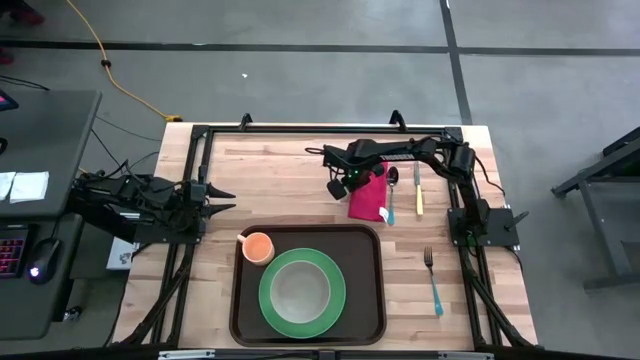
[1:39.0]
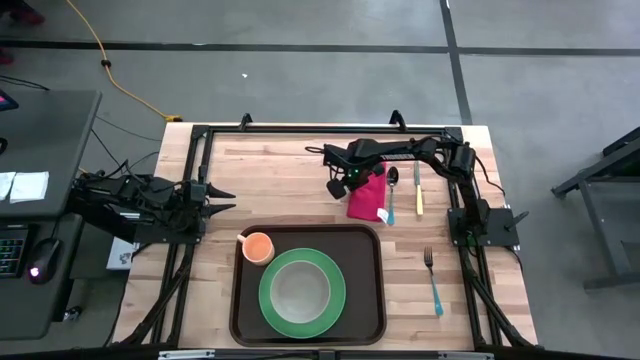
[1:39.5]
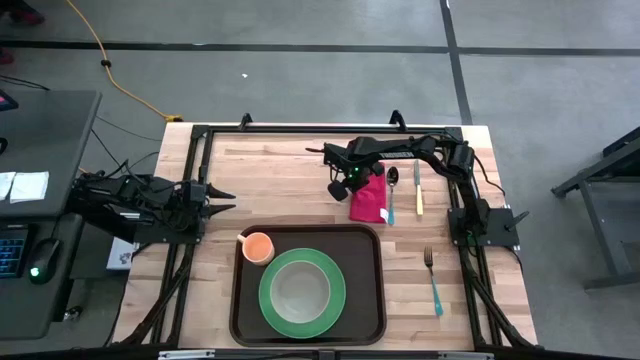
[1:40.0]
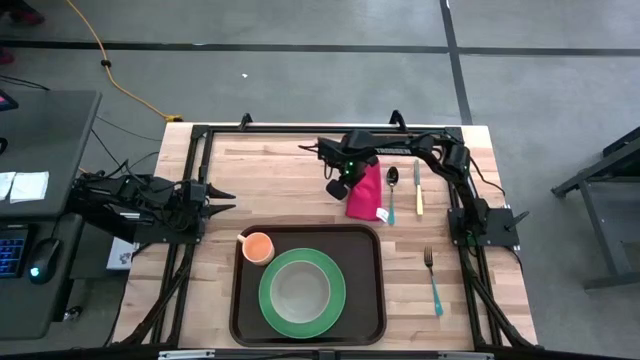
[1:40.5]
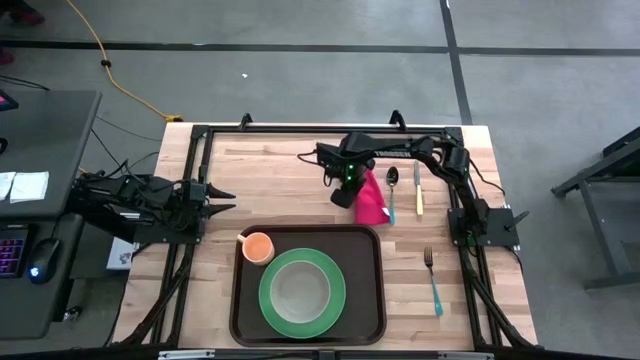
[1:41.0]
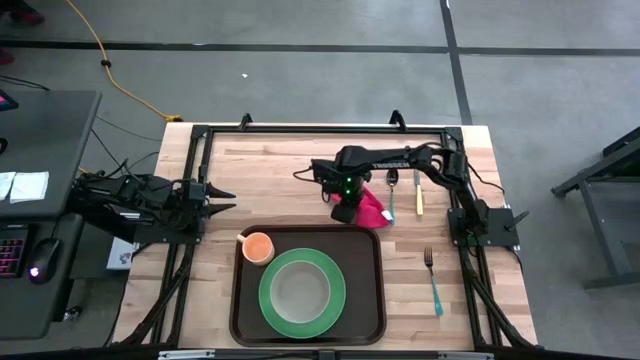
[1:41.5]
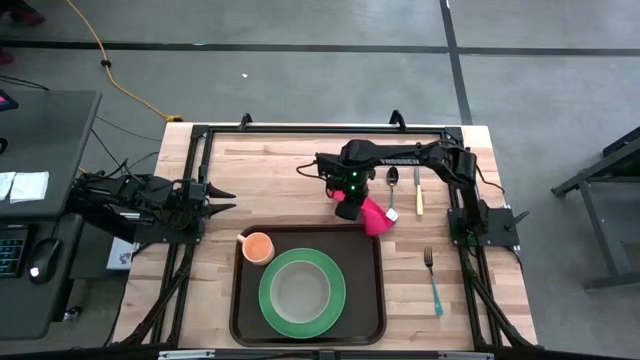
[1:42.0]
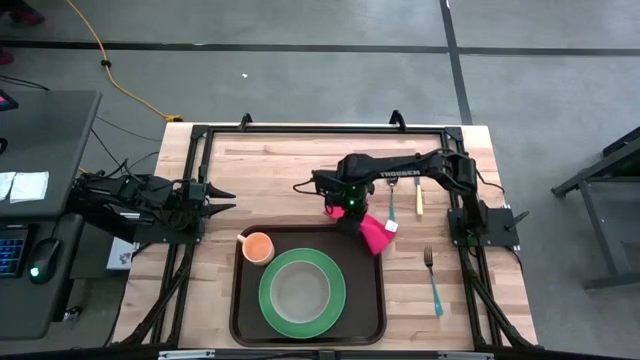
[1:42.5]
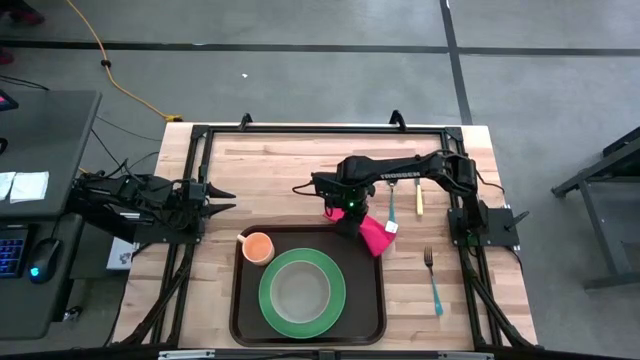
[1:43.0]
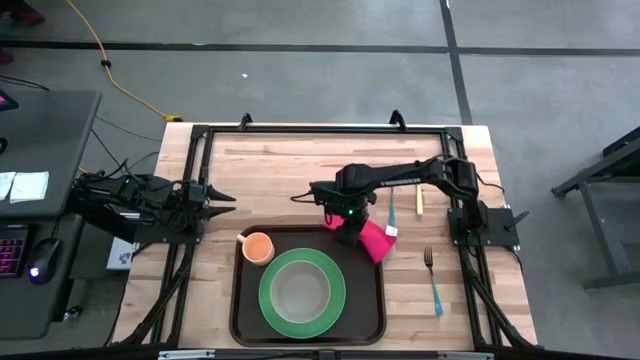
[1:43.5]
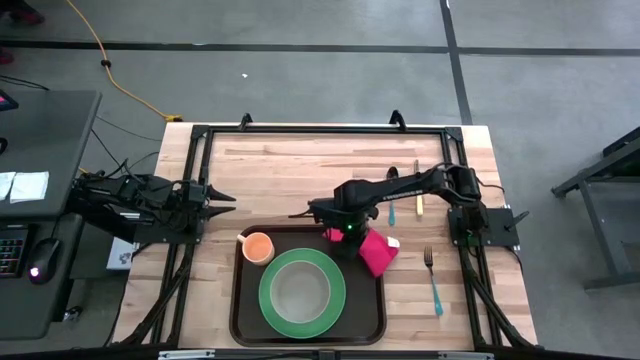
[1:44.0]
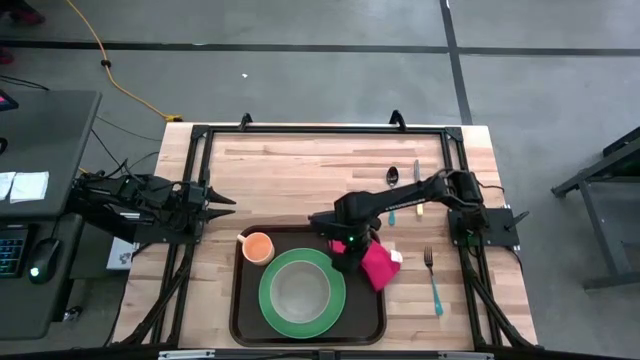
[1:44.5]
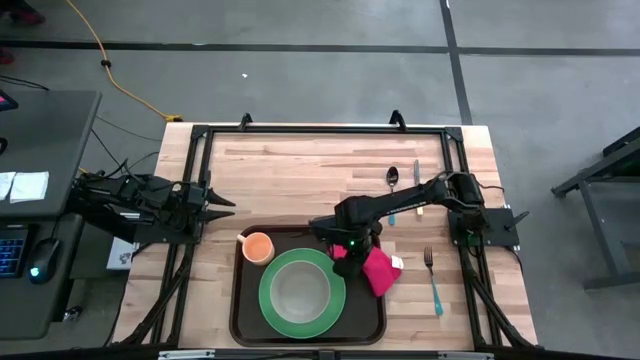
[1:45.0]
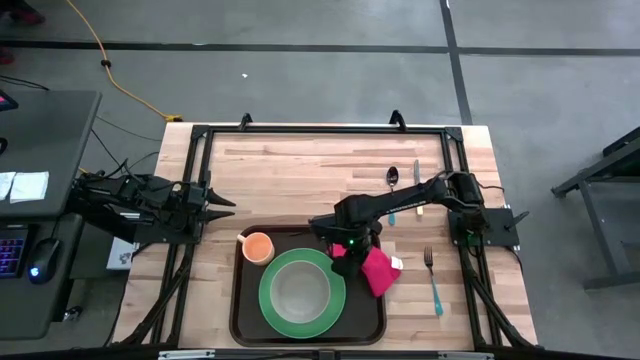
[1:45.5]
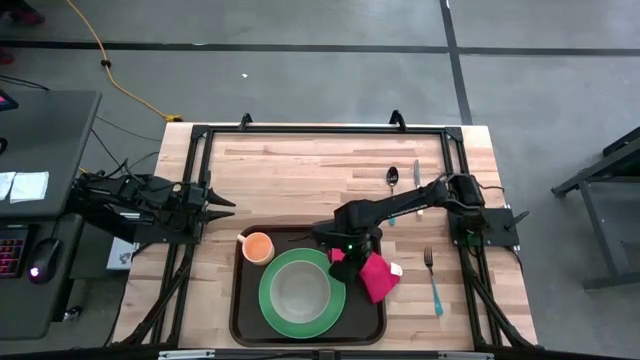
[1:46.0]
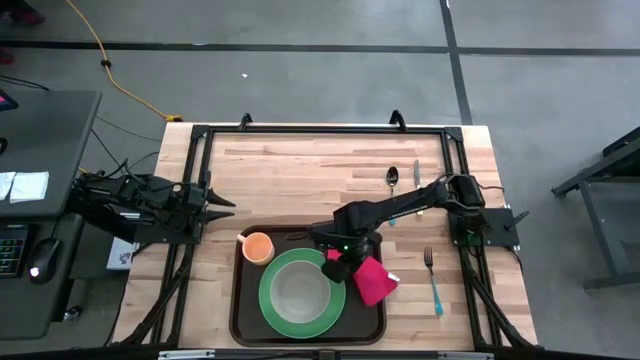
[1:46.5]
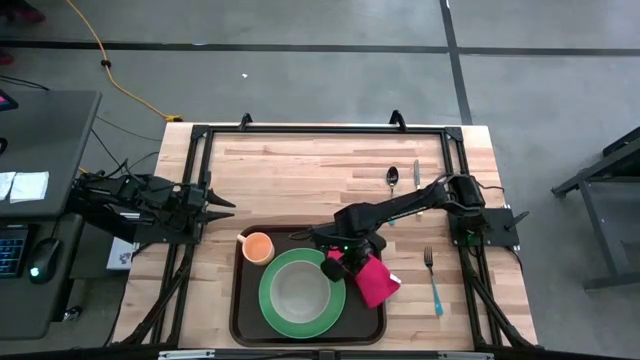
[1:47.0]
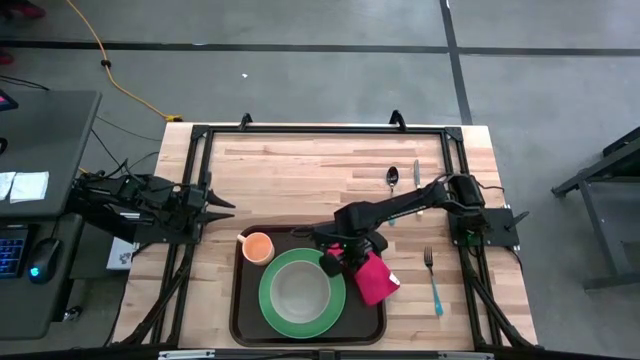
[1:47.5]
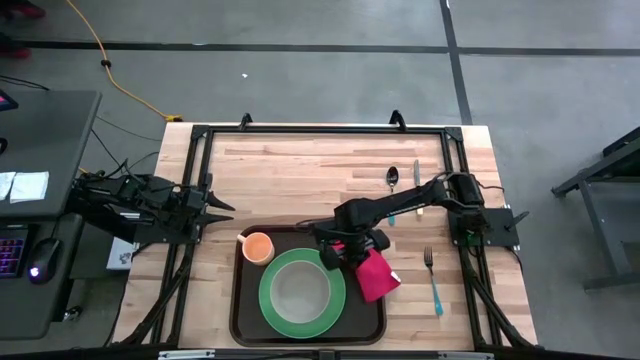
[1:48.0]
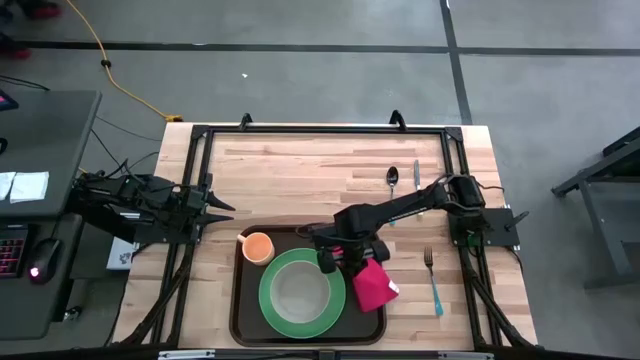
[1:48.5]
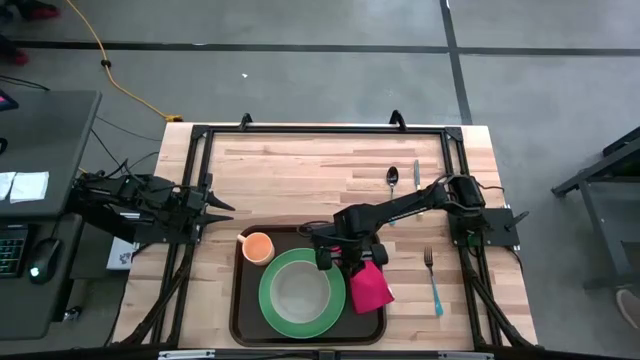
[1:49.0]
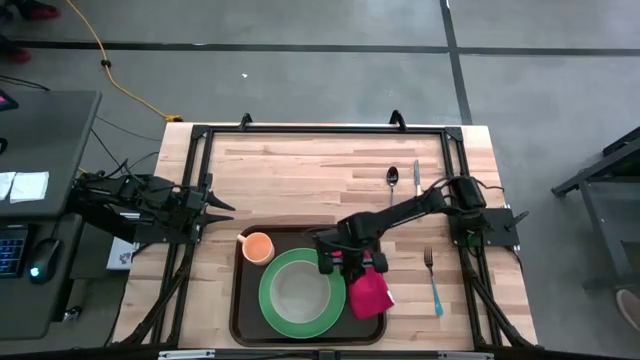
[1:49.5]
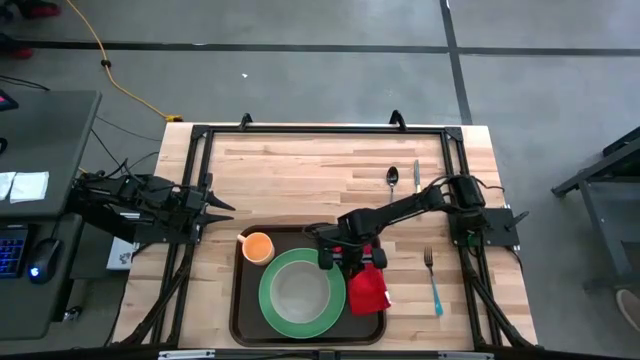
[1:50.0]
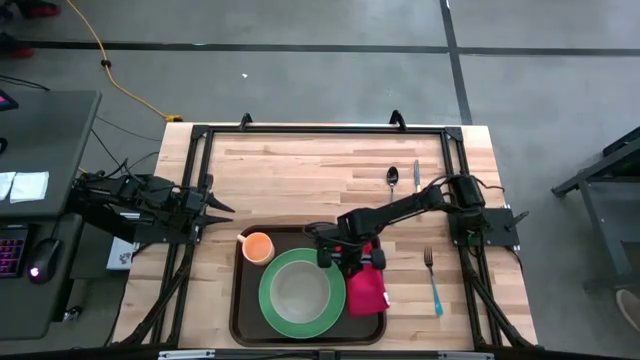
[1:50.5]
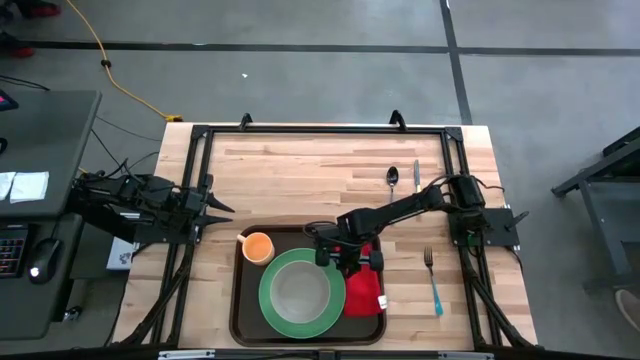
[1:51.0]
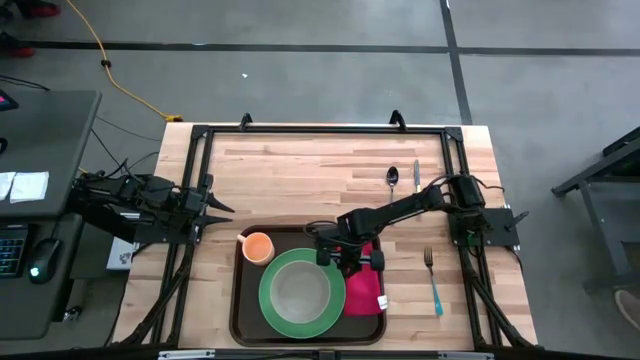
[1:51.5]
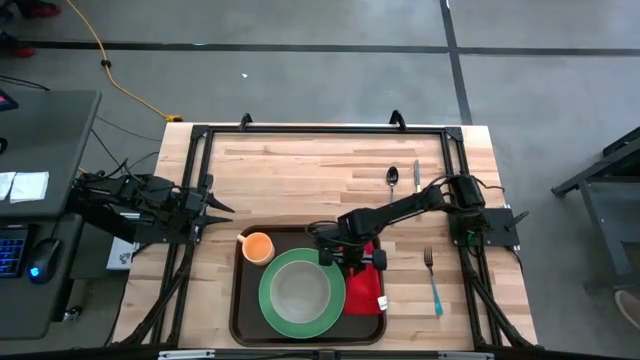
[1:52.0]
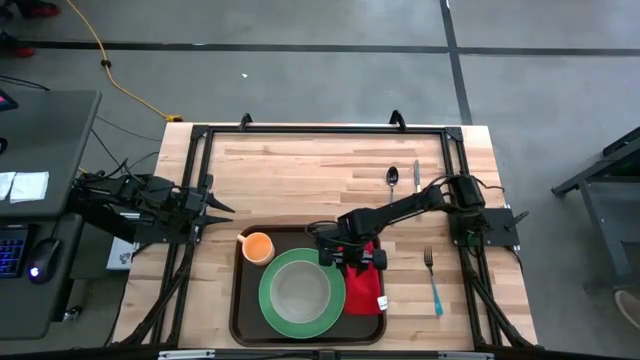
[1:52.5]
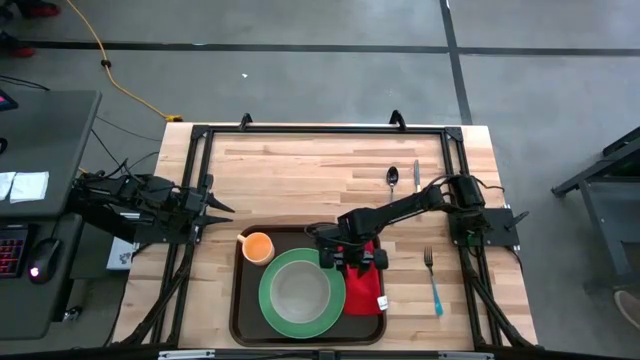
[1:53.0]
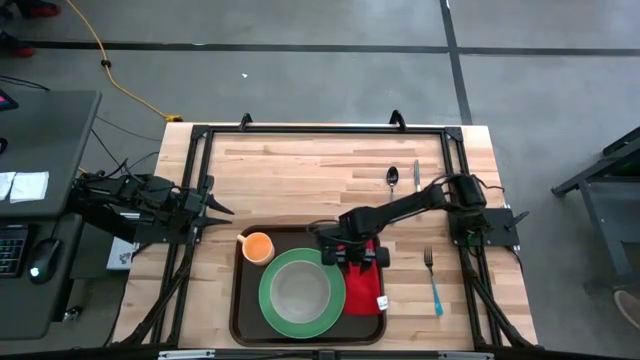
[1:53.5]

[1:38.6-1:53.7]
Task: Set up tray
Put the red napkin on the brown serving tray

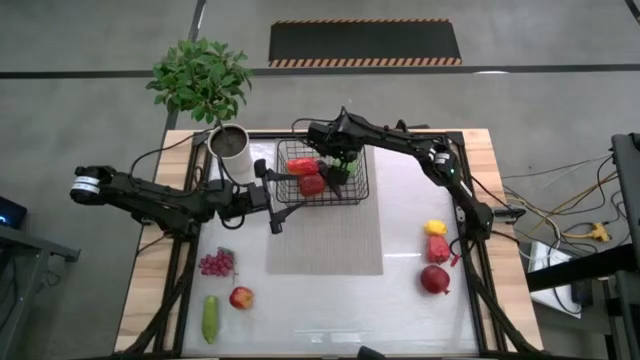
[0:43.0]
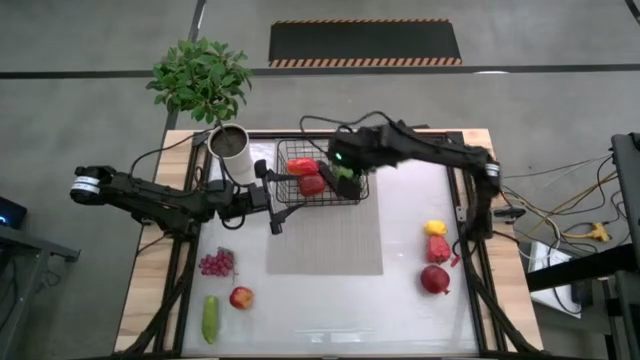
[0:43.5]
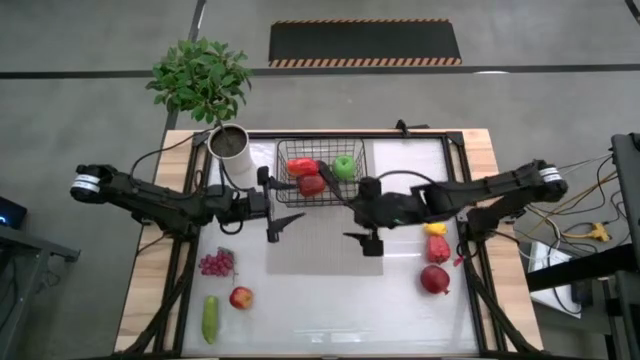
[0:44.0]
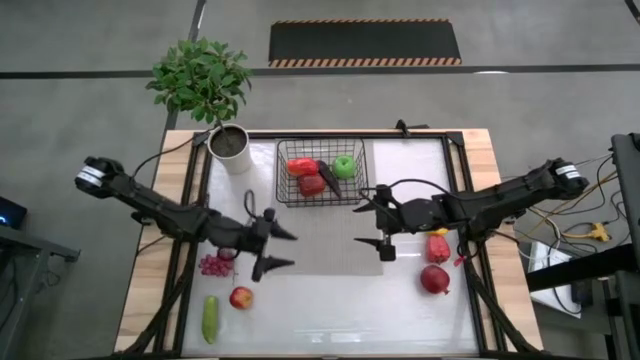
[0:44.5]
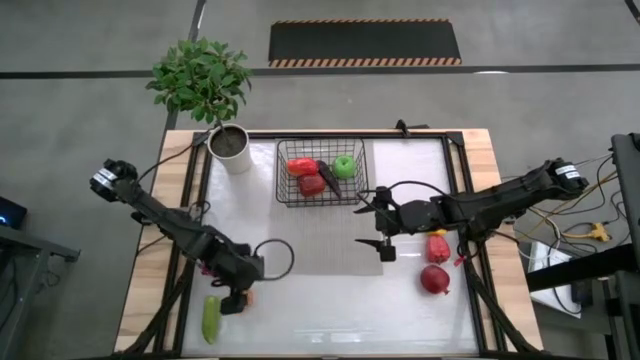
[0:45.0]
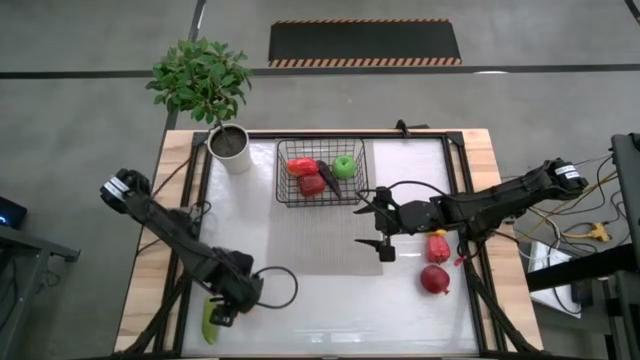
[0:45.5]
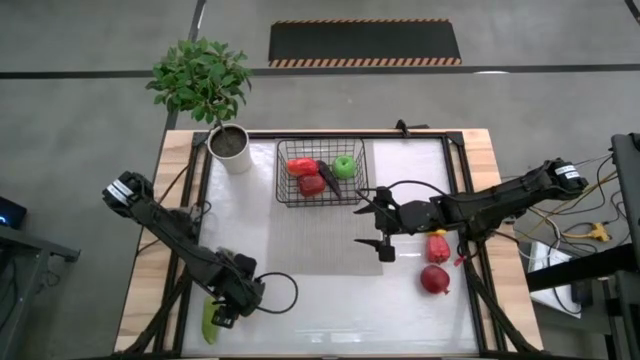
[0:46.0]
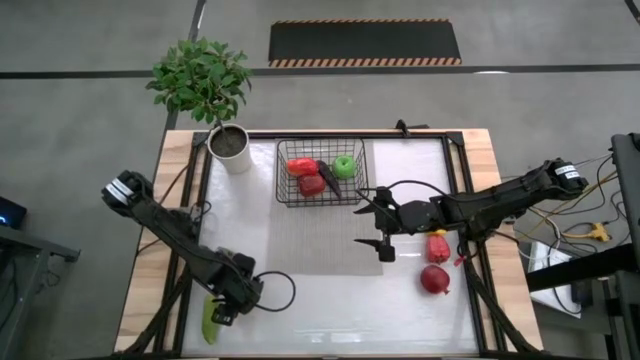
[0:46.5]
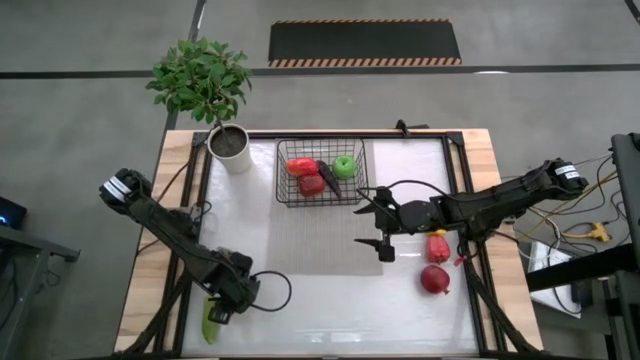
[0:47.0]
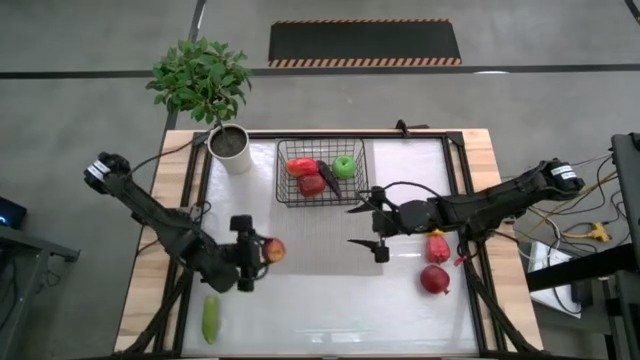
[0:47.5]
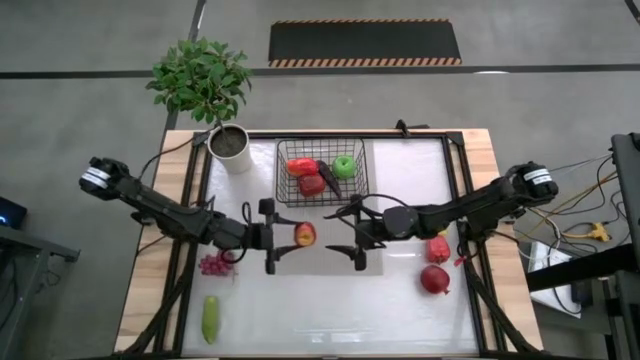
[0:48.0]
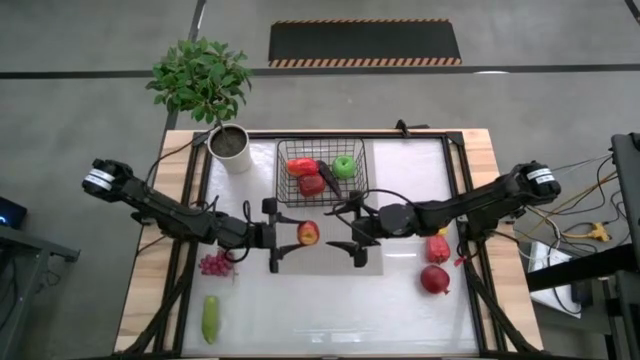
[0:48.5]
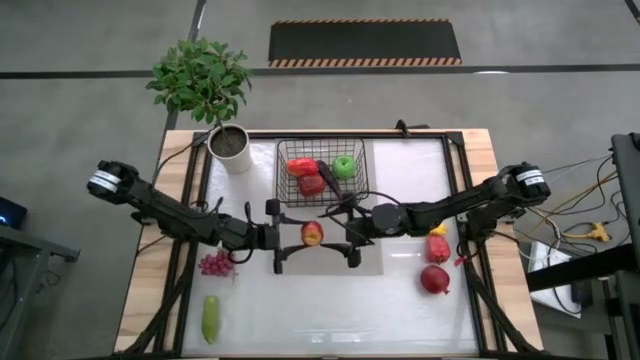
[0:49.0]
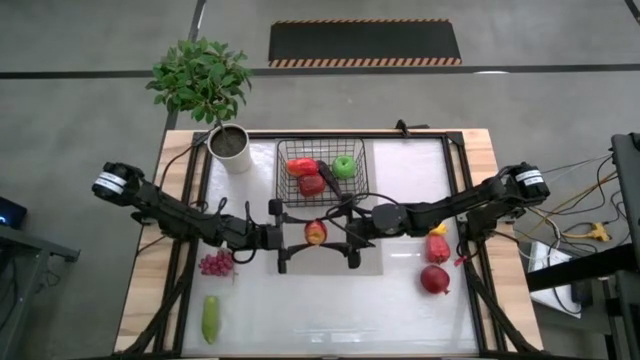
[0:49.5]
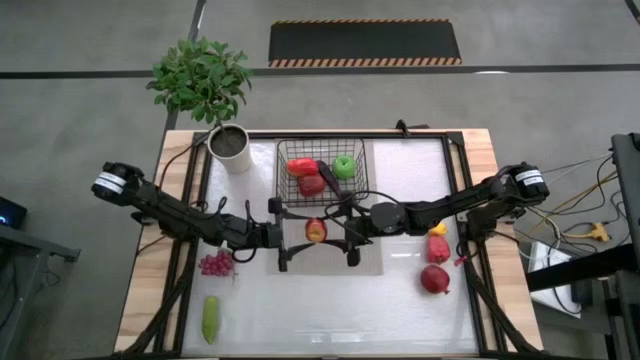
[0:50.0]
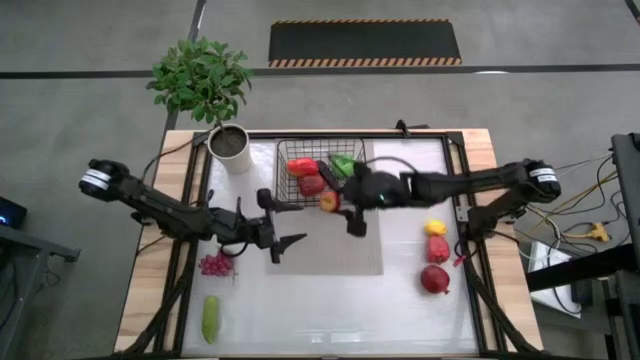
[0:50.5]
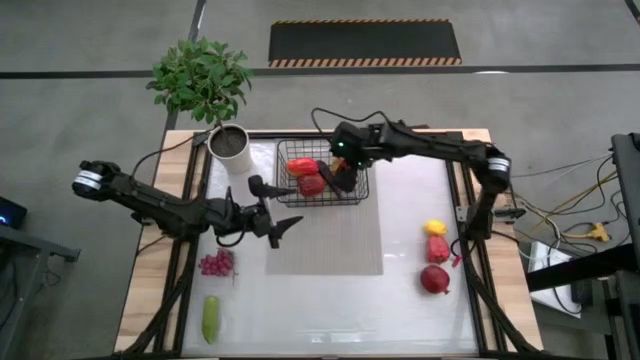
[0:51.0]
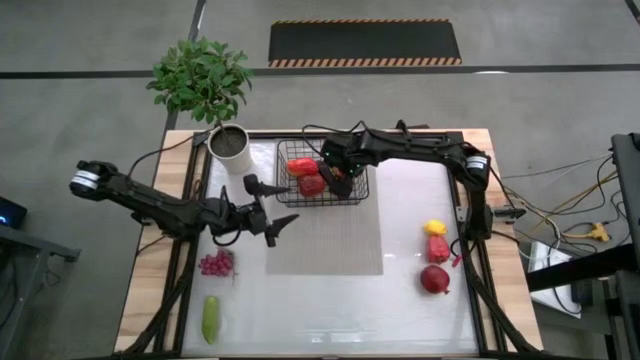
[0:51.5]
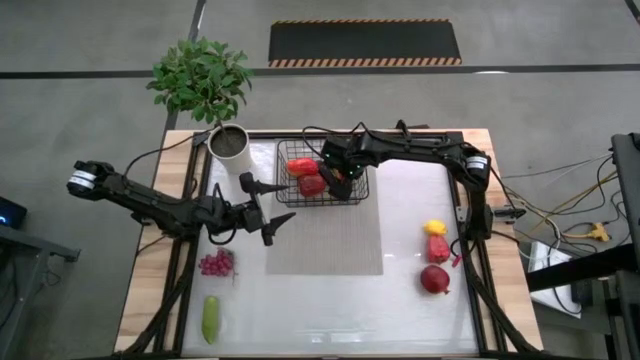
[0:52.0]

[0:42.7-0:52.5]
Task: Build produce basket
Put the red apple into the wire basket
